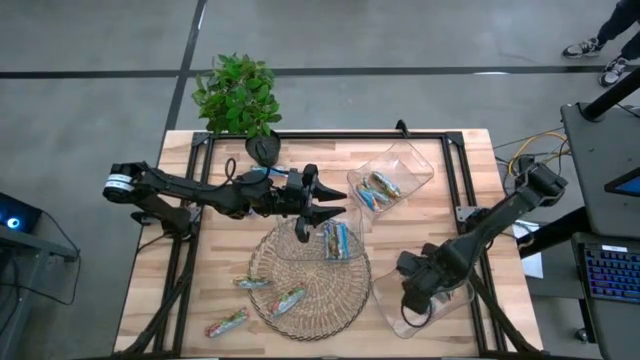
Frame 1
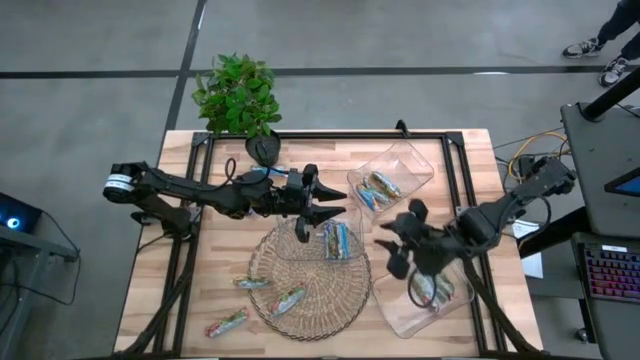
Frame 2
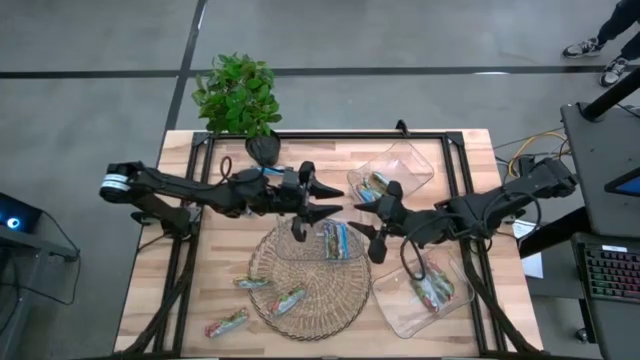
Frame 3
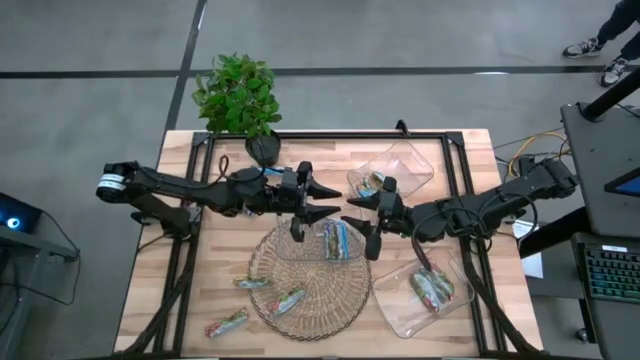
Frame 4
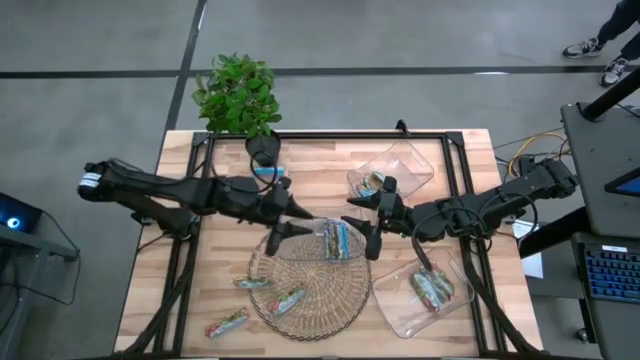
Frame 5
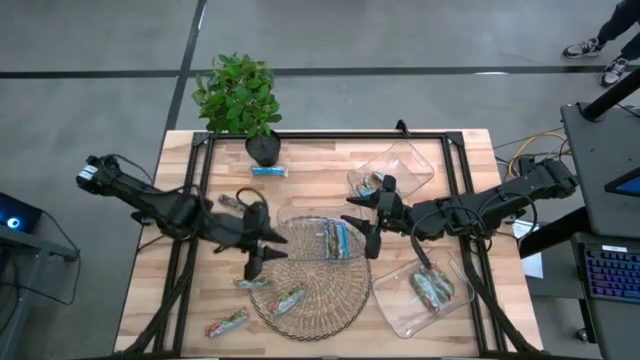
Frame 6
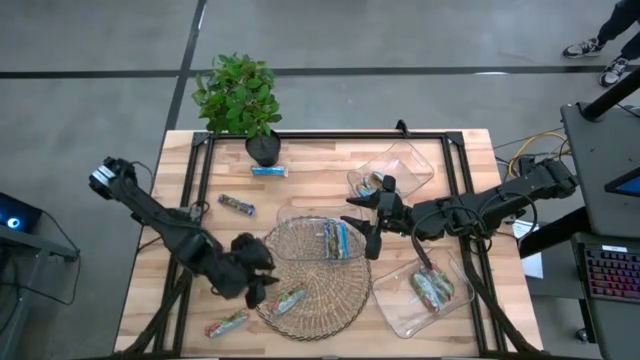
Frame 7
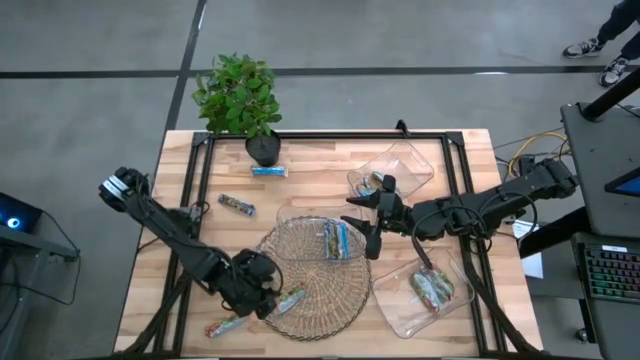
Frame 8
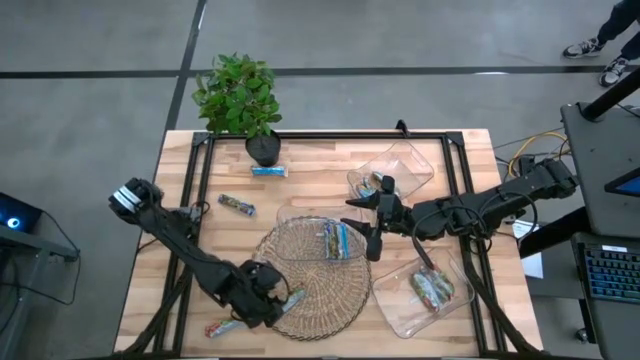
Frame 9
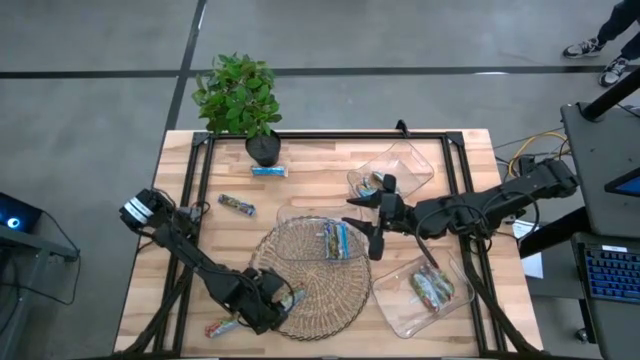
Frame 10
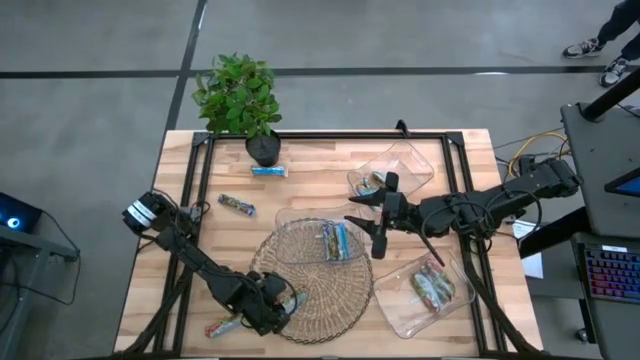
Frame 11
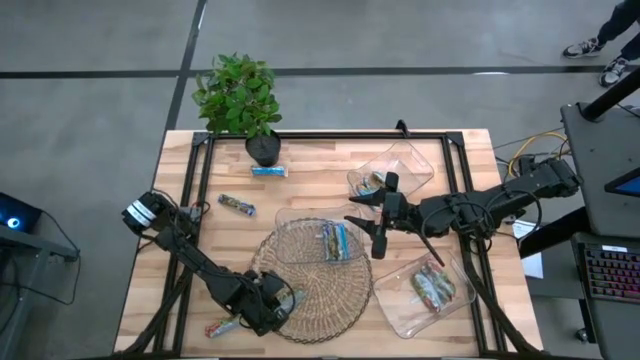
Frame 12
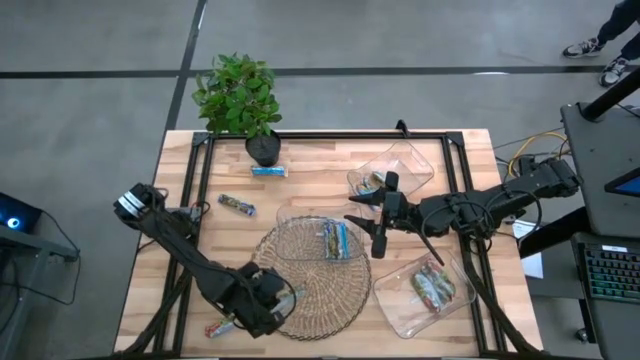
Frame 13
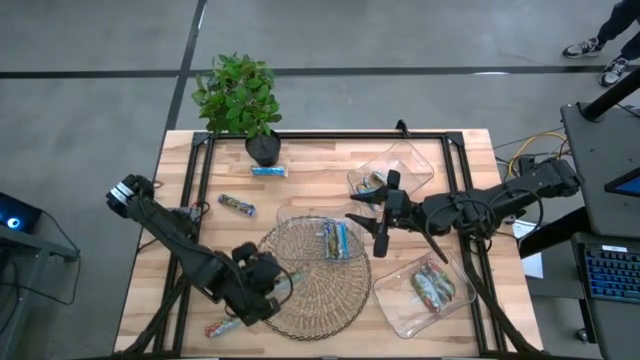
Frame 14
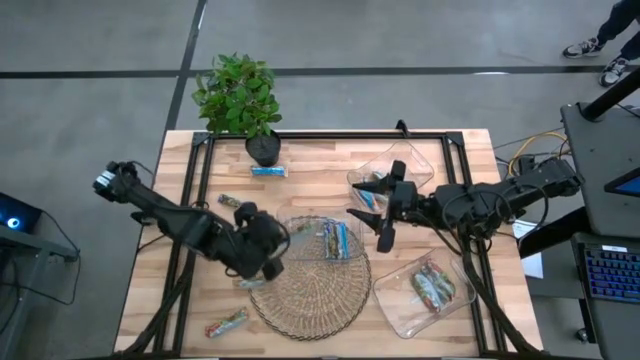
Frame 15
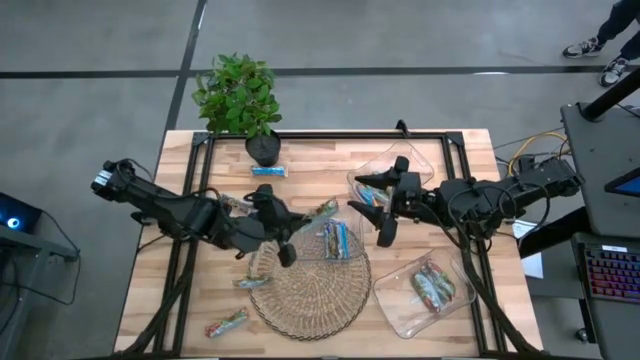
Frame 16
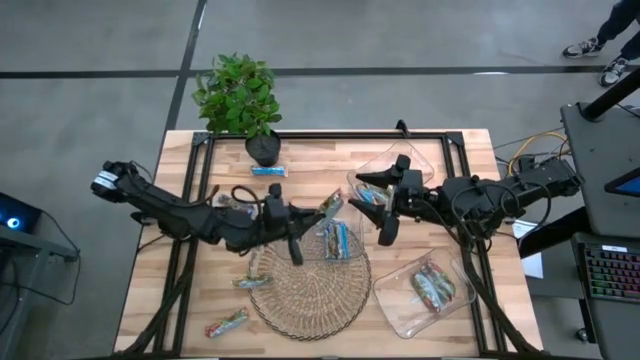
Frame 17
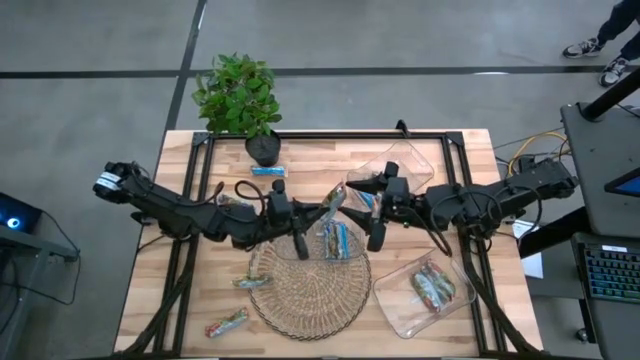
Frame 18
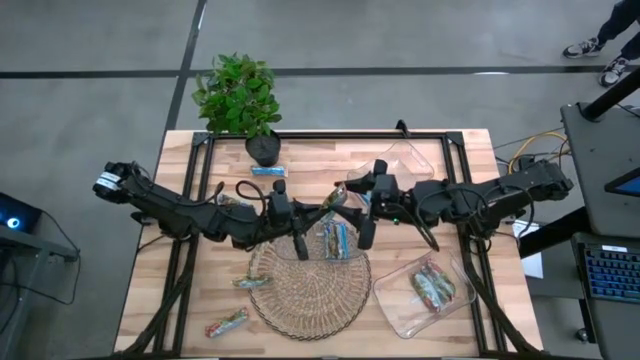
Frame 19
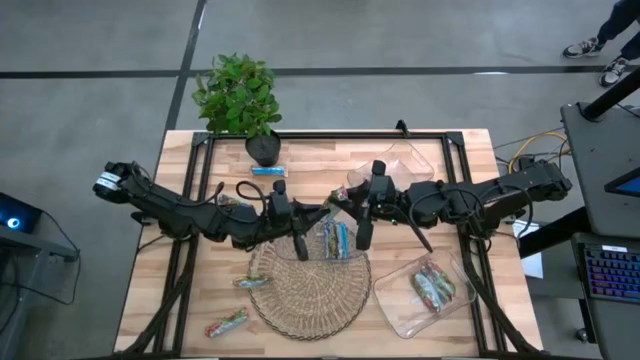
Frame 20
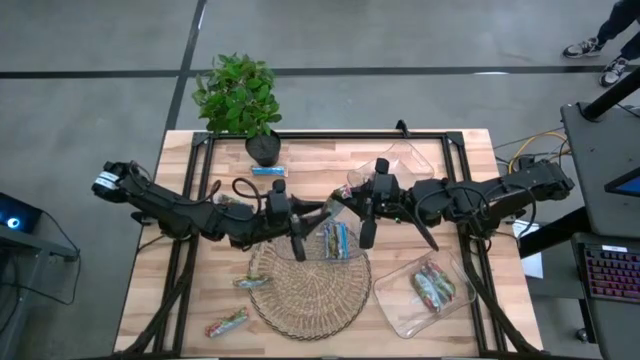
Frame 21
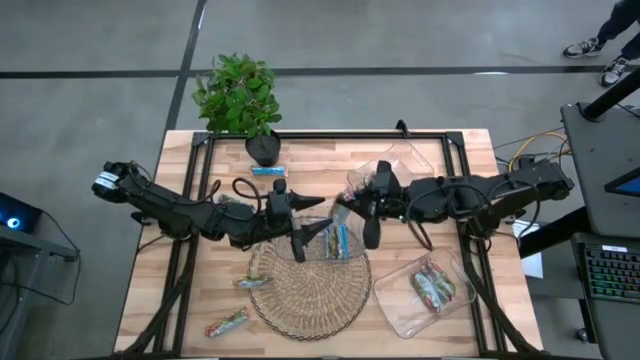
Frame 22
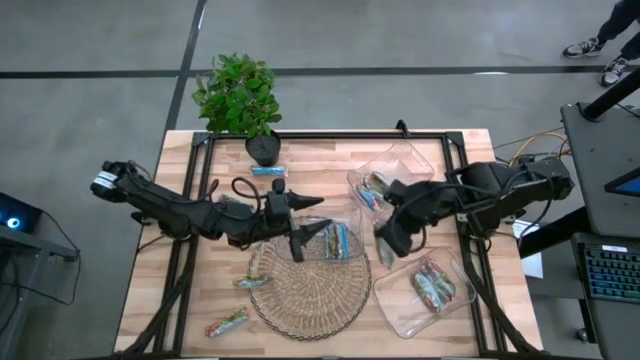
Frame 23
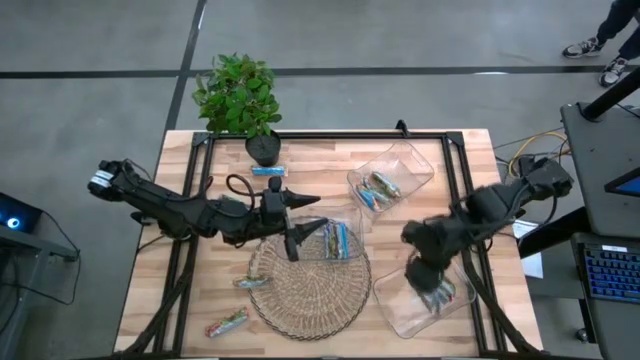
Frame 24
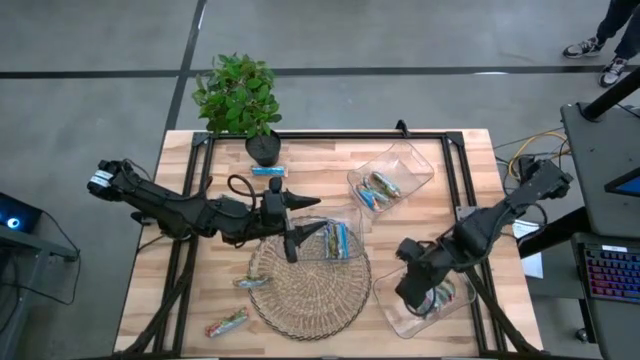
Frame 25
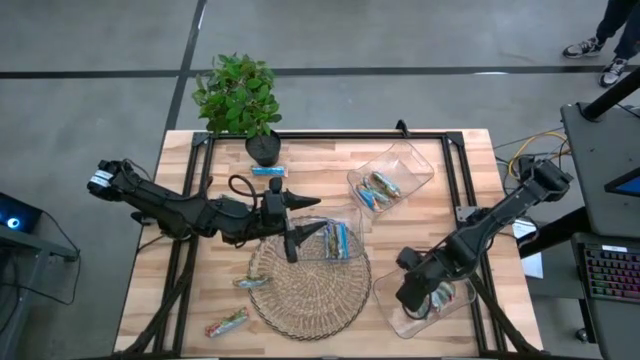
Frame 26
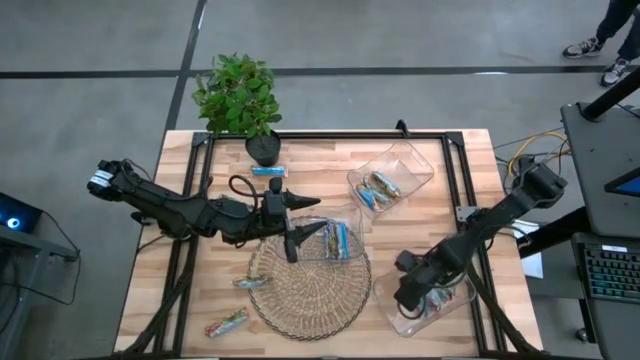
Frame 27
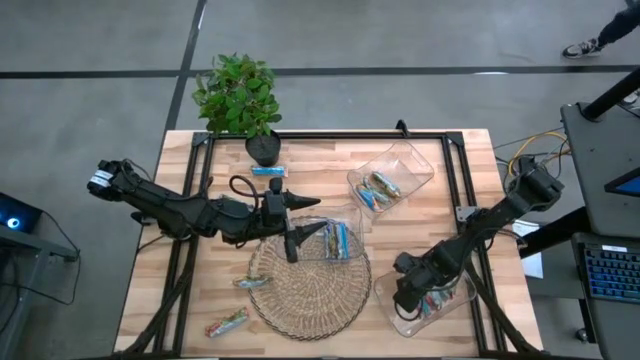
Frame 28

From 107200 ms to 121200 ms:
Task: Pick and place Granola Bars by type
Put the red granola bar into the bottom transparent bin

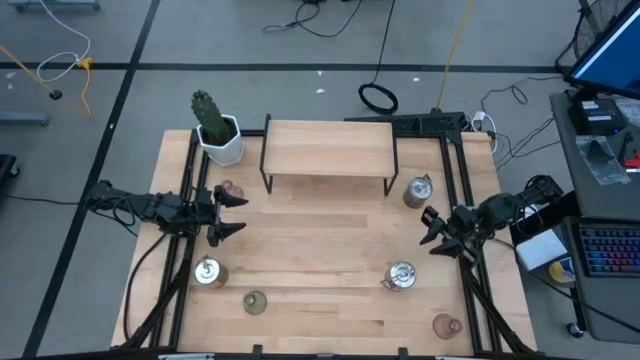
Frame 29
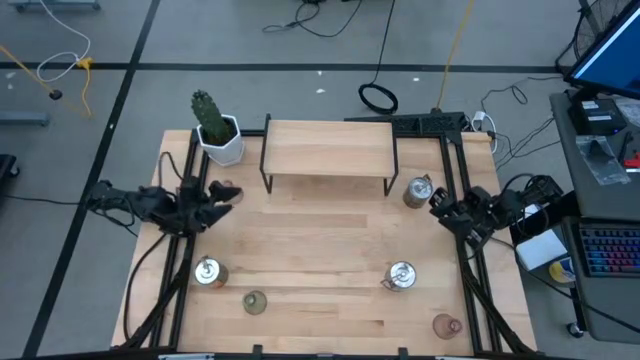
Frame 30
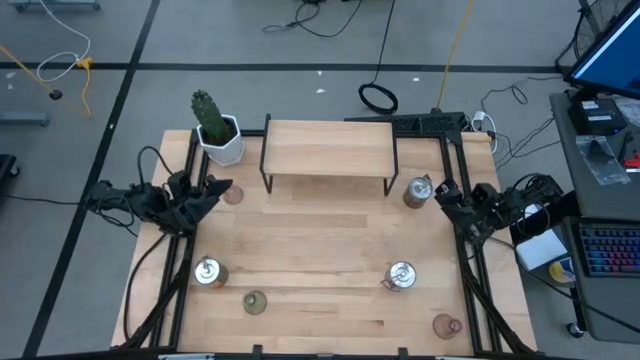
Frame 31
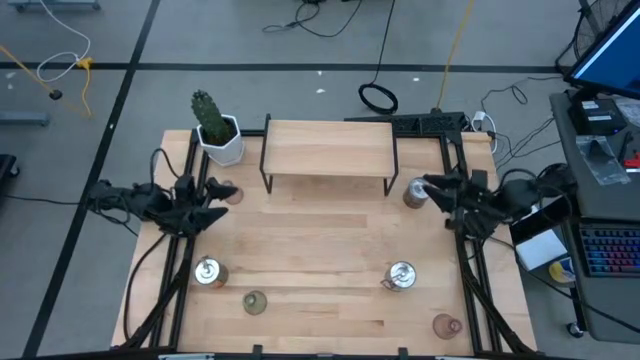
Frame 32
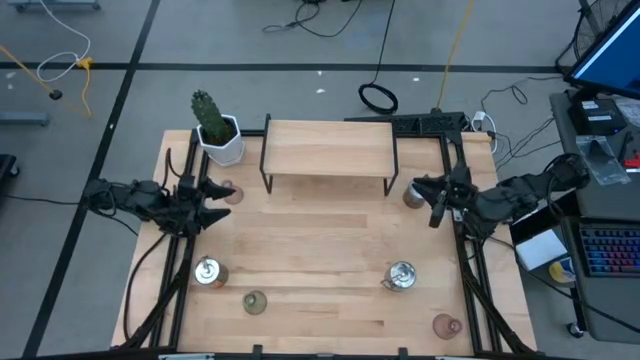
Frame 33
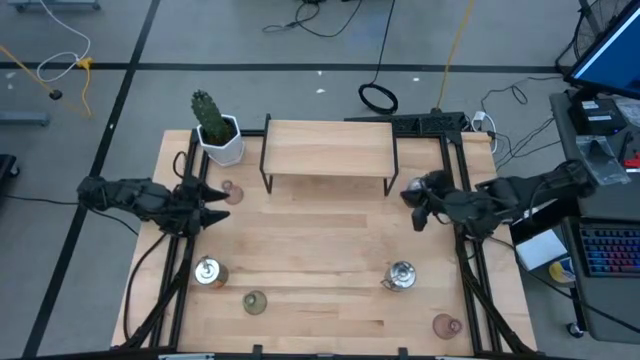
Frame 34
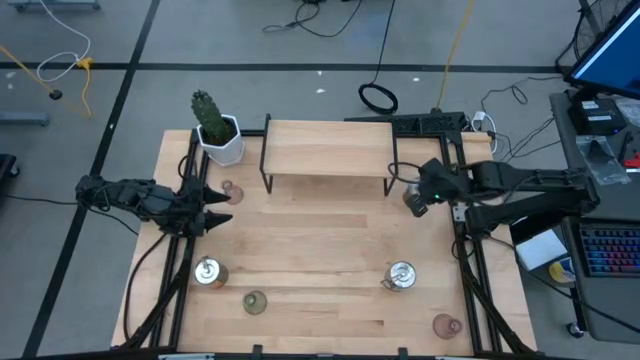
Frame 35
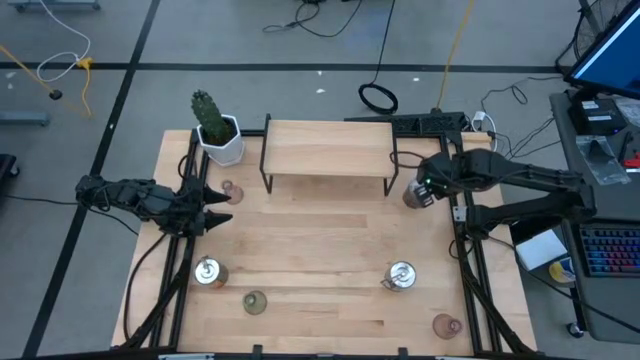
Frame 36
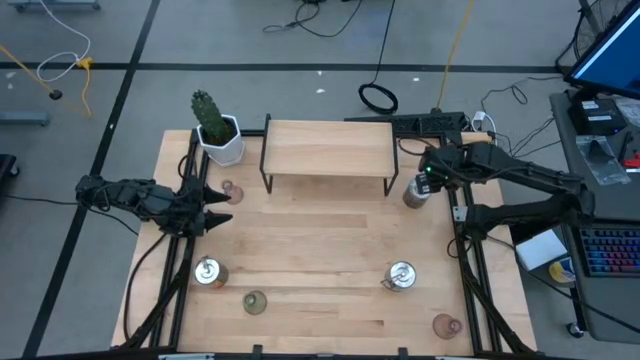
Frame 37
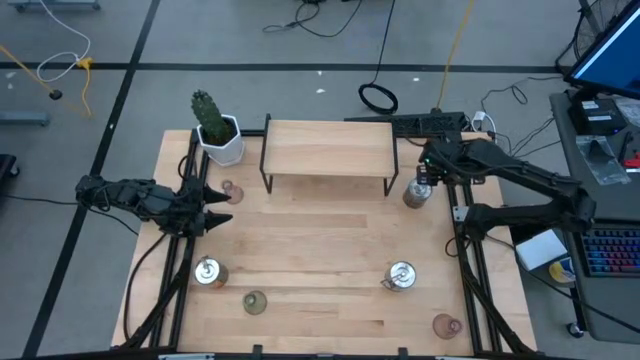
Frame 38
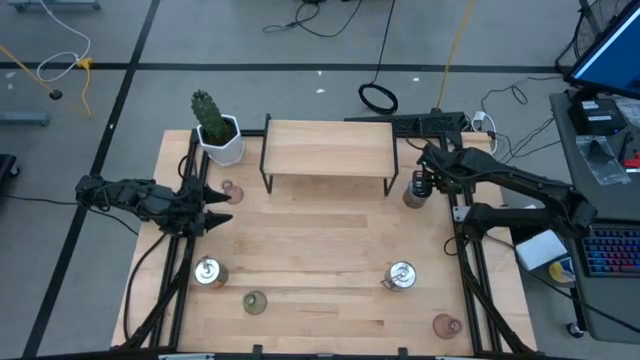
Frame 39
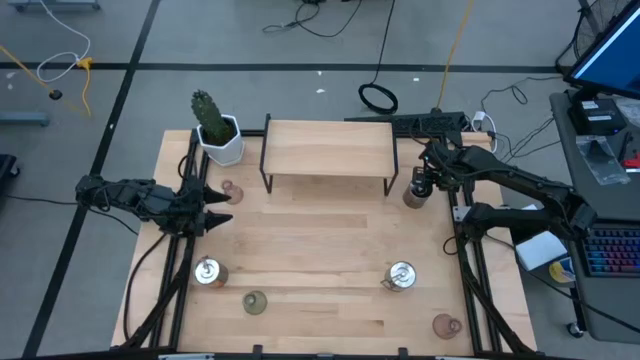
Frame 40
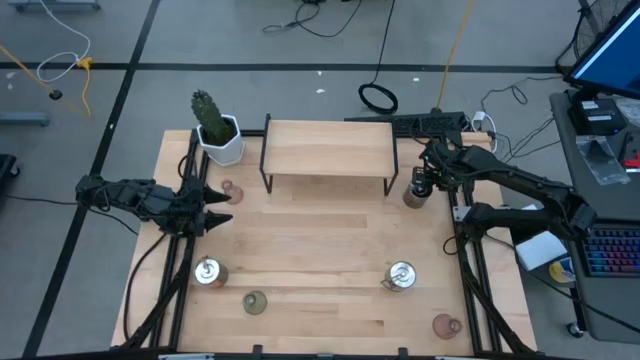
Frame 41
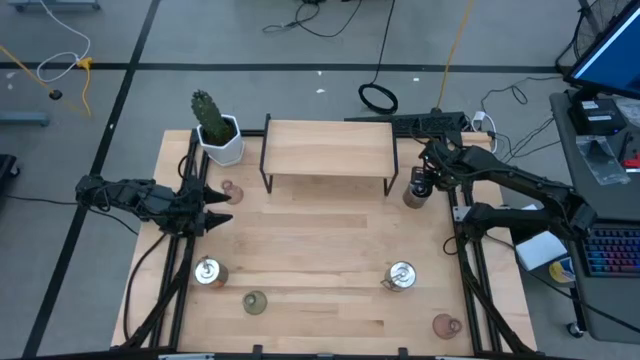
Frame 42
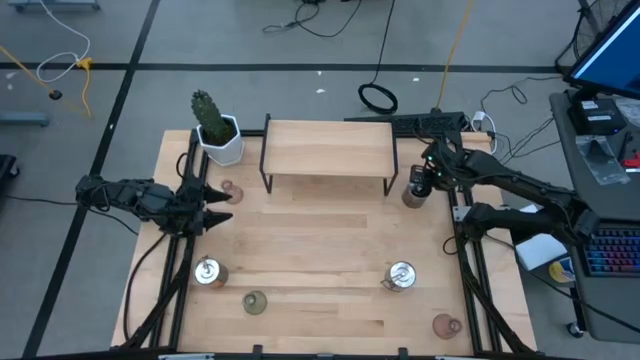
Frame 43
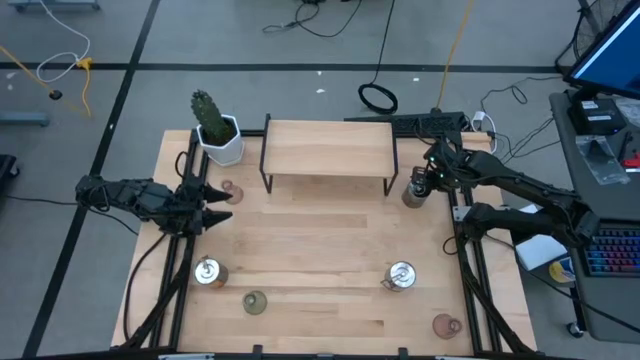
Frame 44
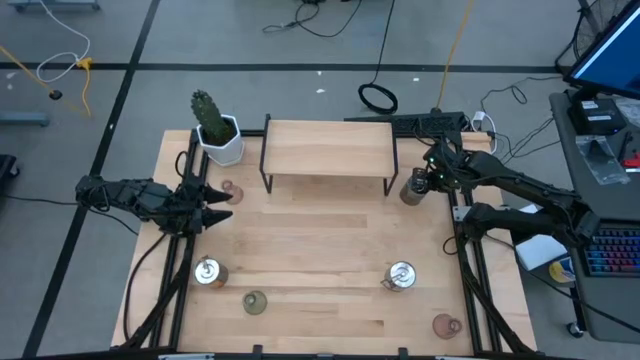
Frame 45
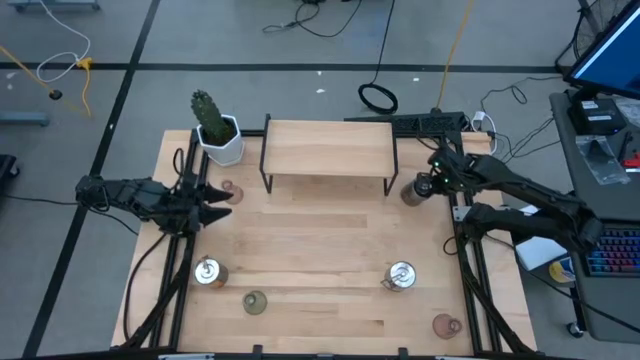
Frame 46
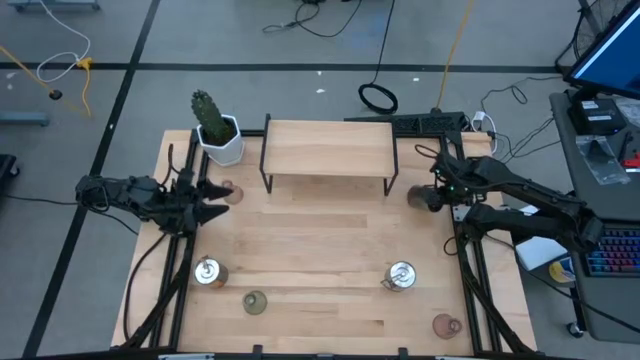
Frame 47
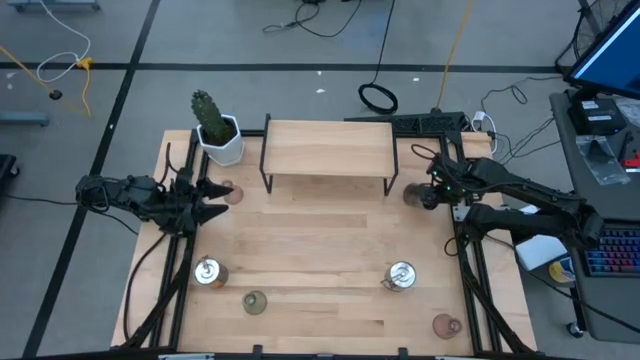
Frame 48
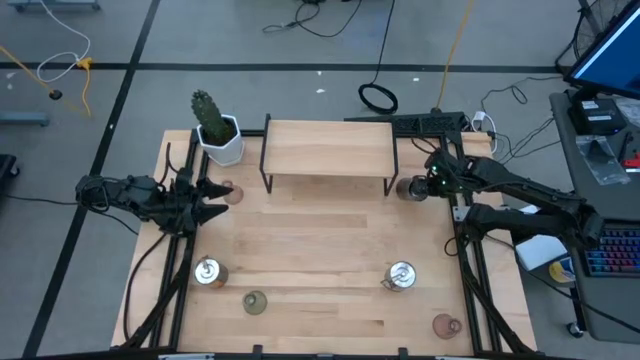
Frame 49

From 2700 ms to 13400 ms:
Task: Pick & Place candle stick holders
Put the top right silver scented candle on the shelf
